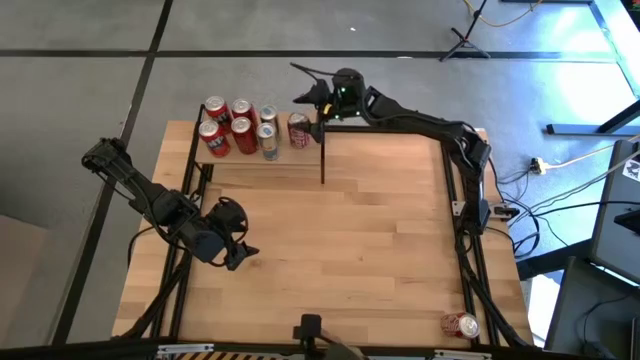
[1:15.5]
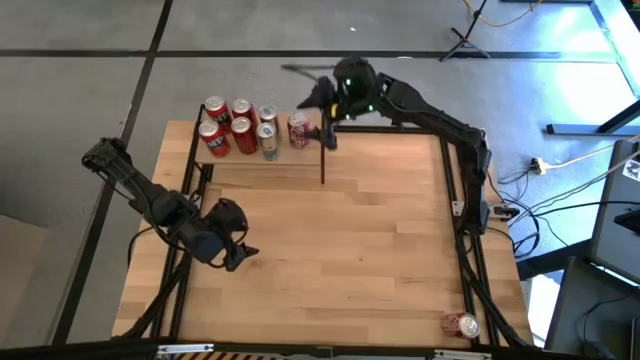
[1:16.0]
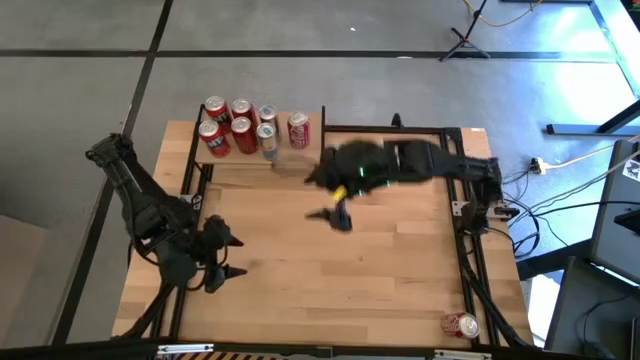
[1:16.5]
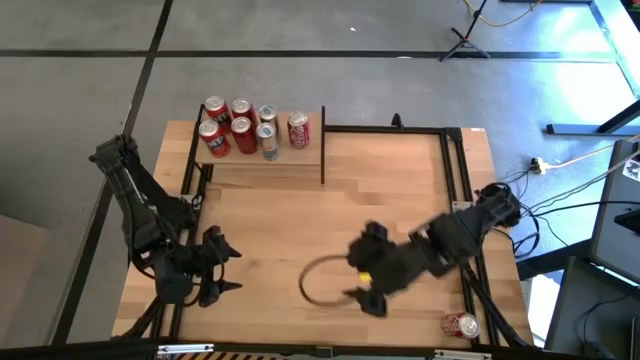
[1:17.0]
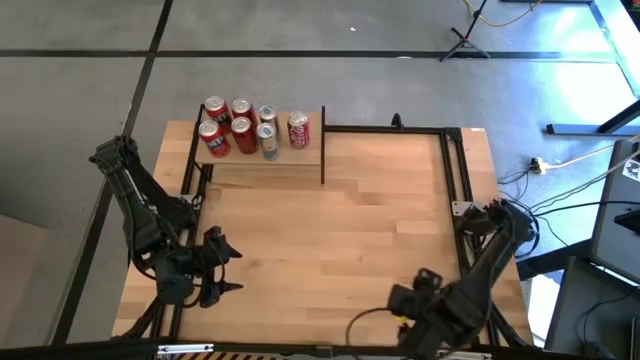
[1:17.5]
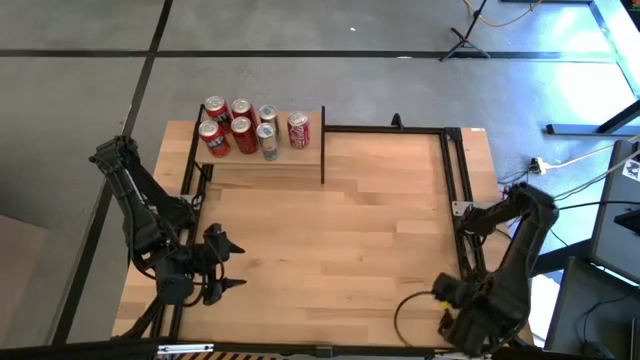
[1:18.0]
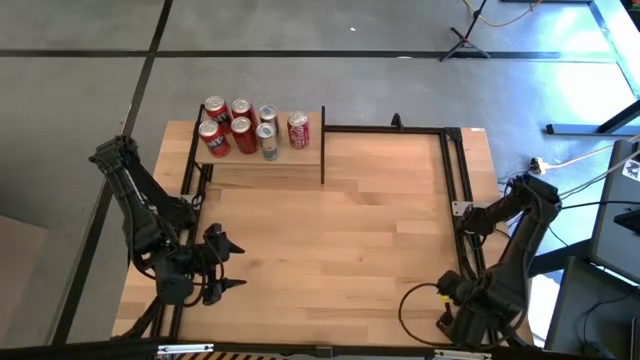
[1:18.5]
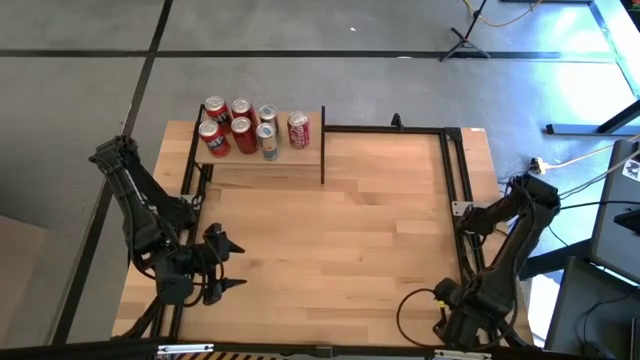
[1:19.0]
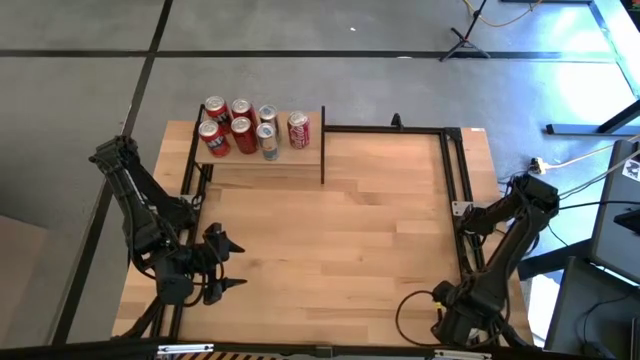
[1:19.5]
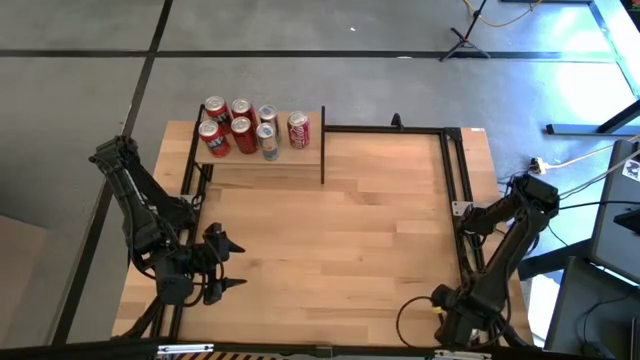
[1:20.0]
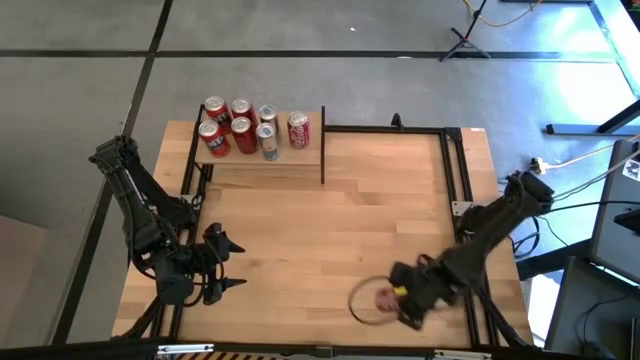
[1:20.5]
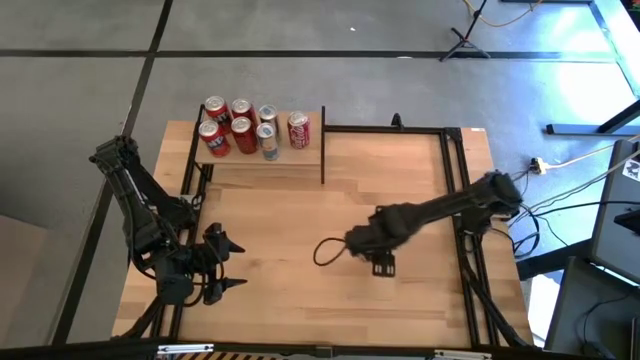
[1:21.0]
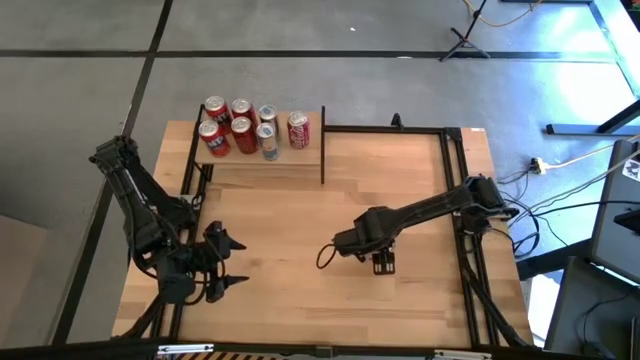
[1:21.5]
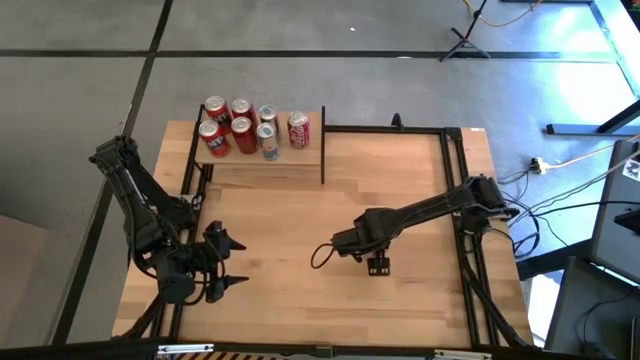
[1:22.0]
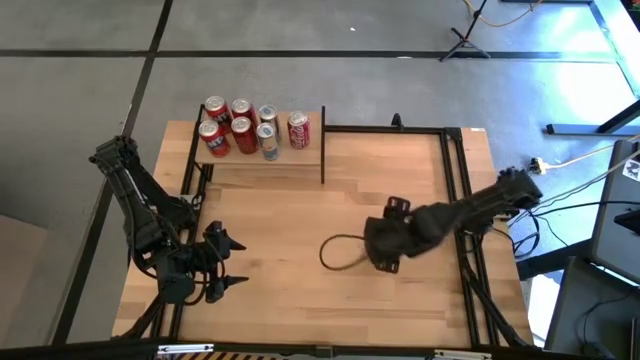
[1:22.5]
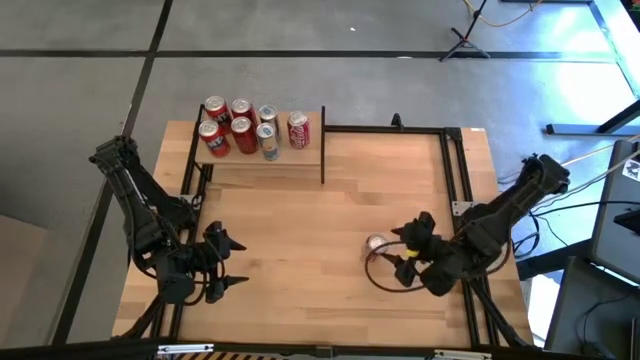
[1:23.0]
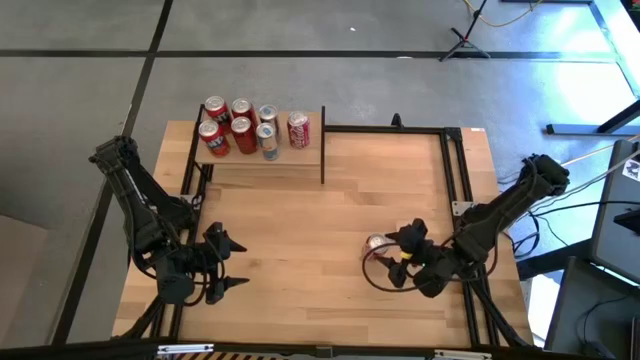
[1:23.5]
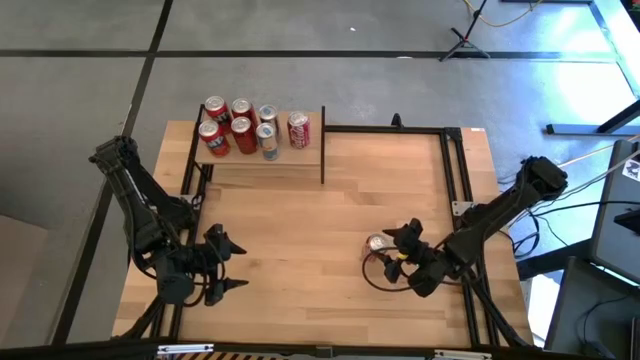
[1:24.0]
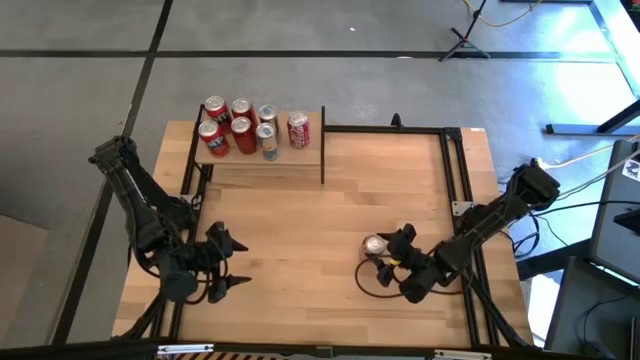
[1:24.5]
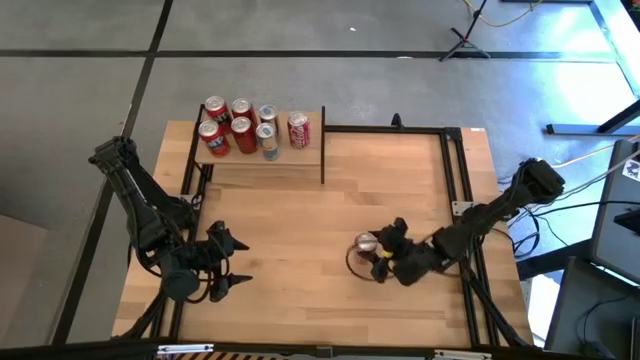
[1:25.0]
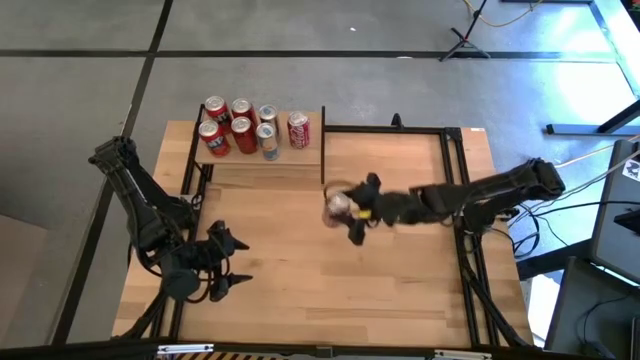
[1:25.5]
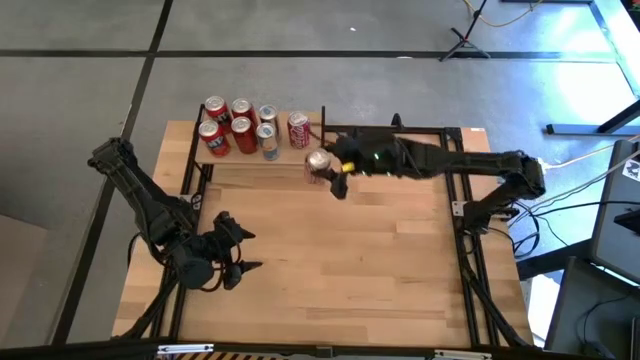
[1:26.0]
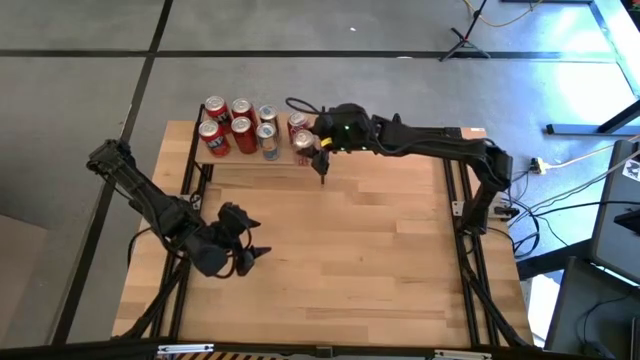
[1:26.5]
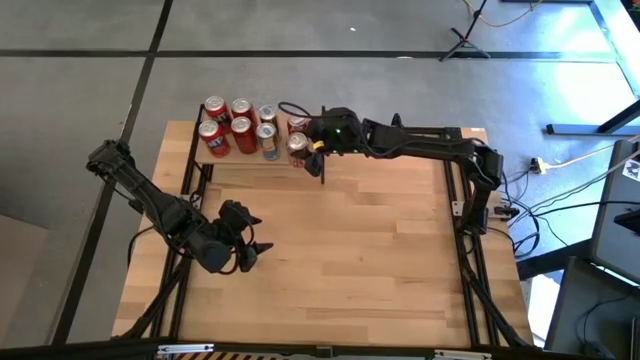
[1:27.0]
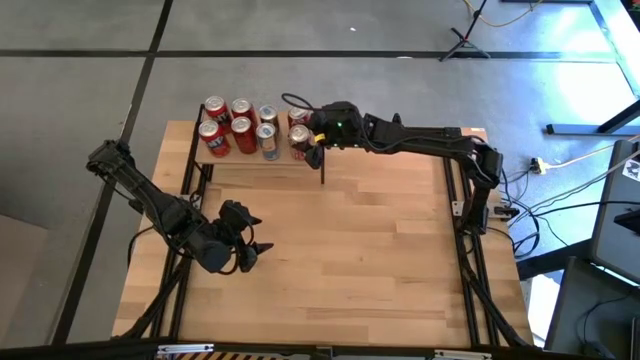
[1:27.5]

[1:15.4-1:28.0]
Task: Place canned beverage on shelf
Put the red white soda can on the shelf aligned with the other red white soda can

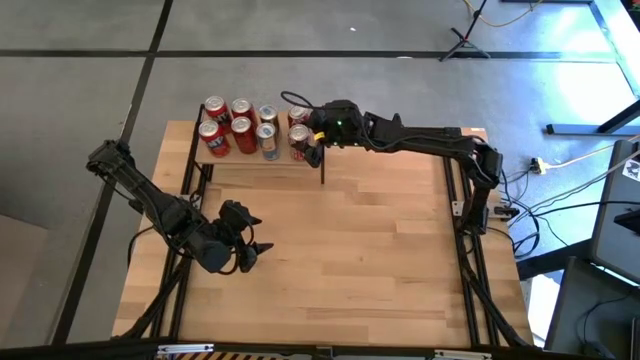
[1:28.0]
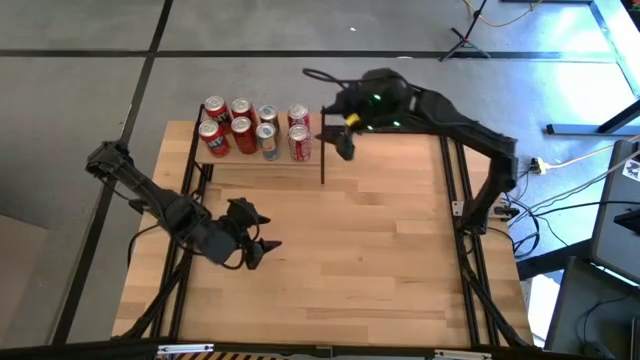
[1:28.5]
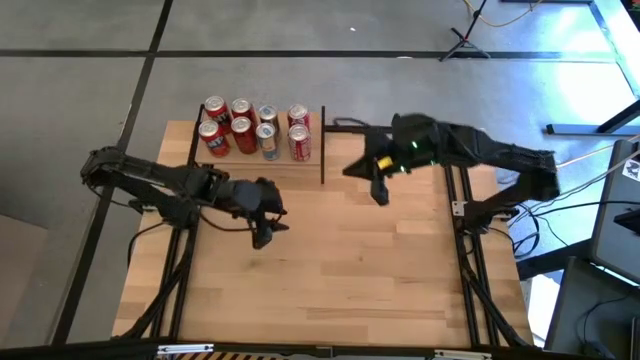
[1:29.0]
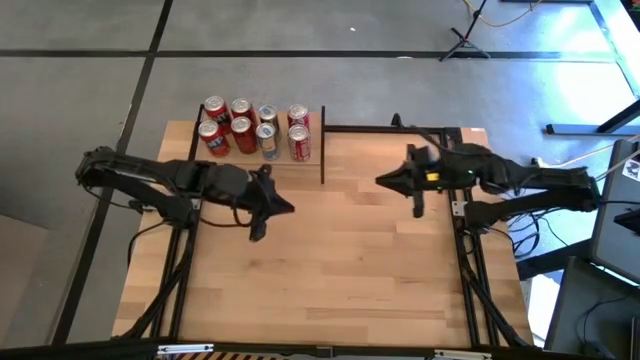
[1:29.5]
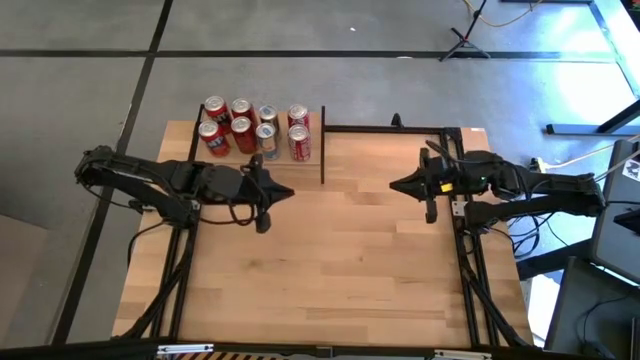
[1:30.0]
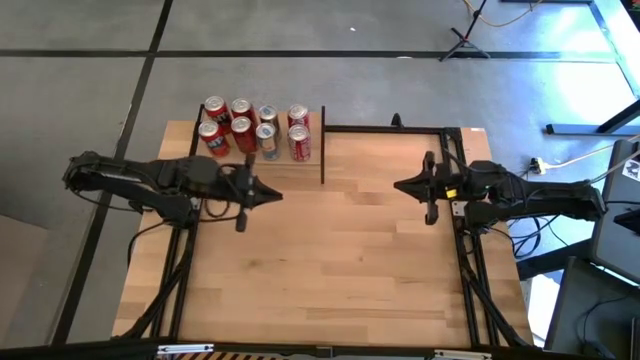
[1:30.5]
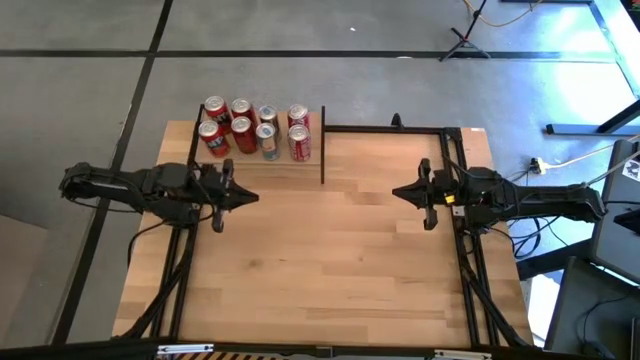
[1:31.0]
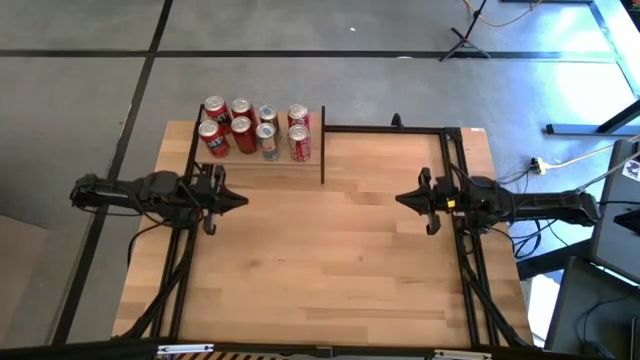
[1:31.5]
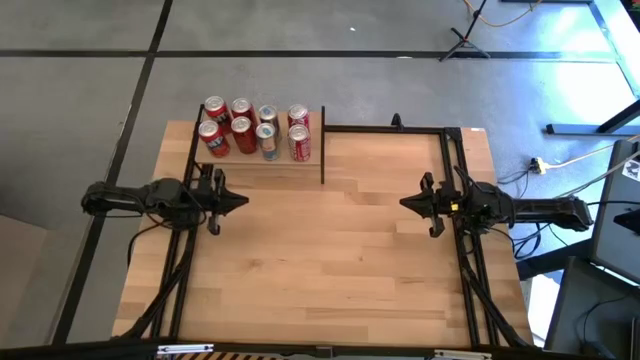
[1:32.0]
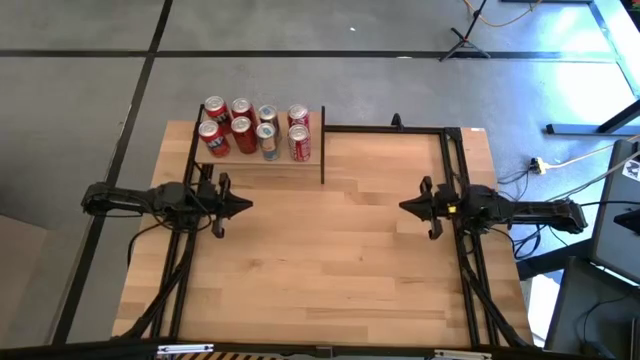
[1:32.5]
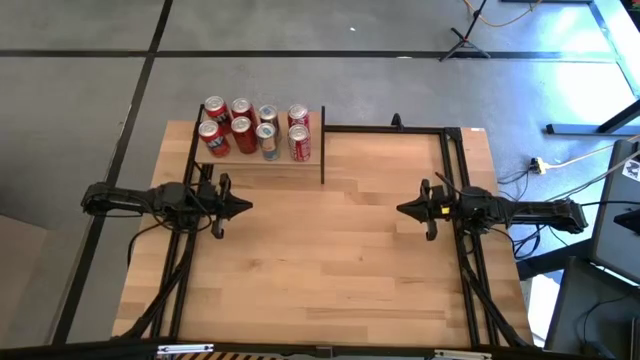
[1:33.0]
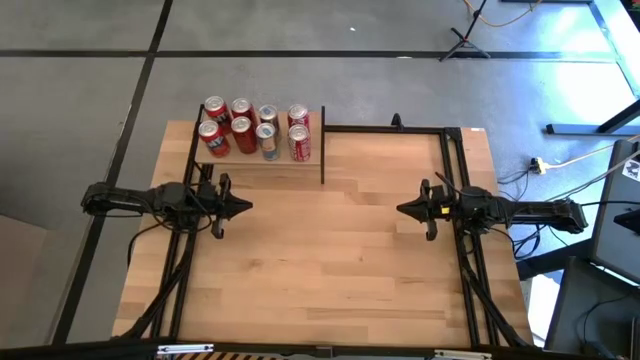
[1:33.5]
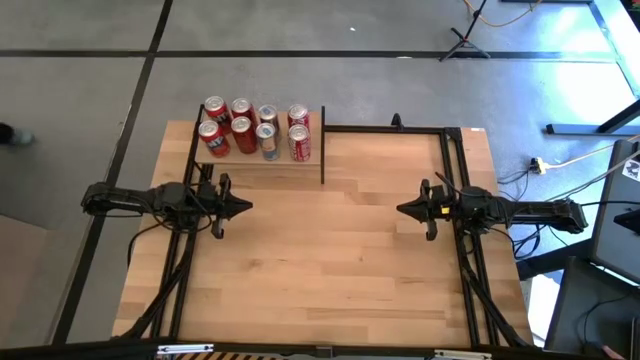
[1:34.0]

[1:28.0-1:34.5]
Return to Home Position

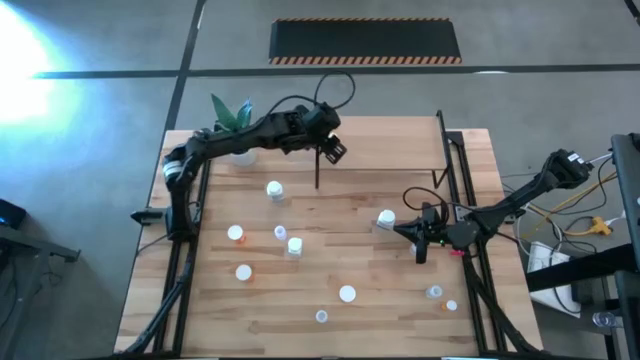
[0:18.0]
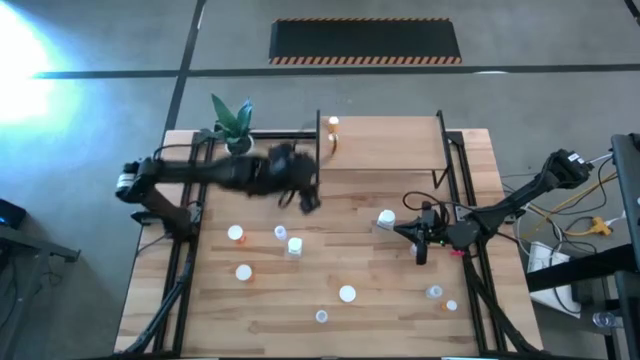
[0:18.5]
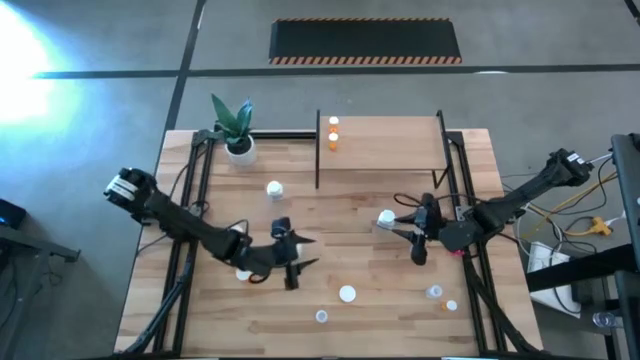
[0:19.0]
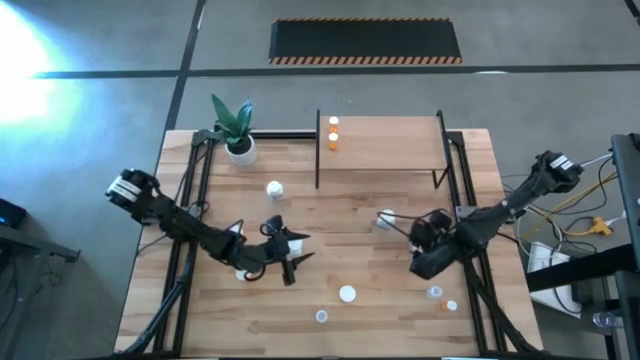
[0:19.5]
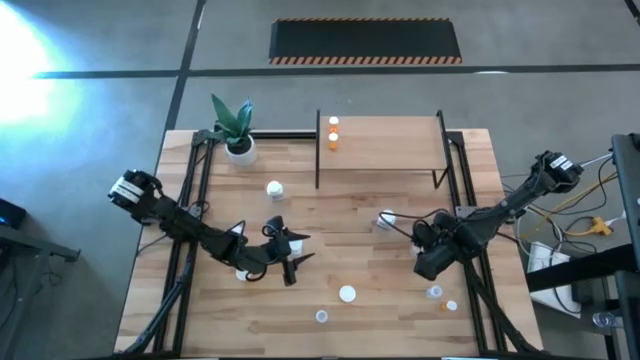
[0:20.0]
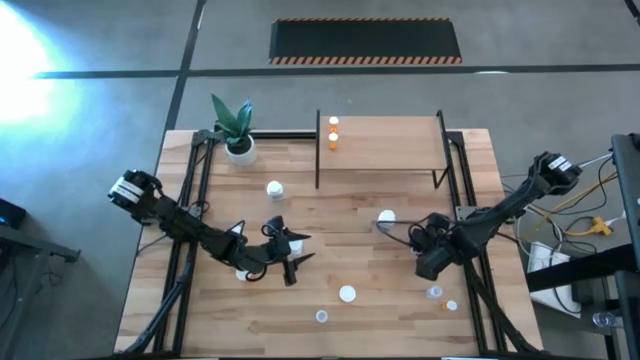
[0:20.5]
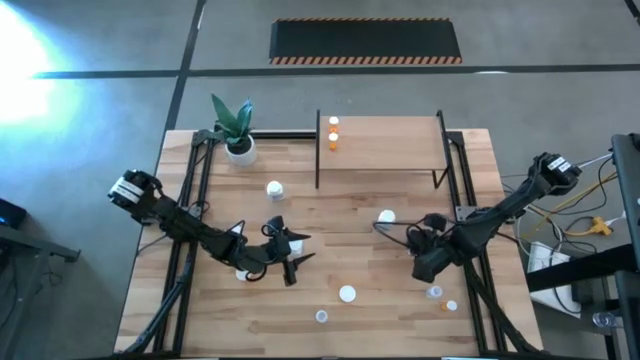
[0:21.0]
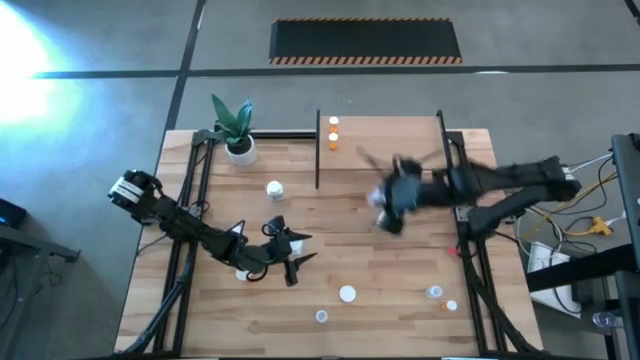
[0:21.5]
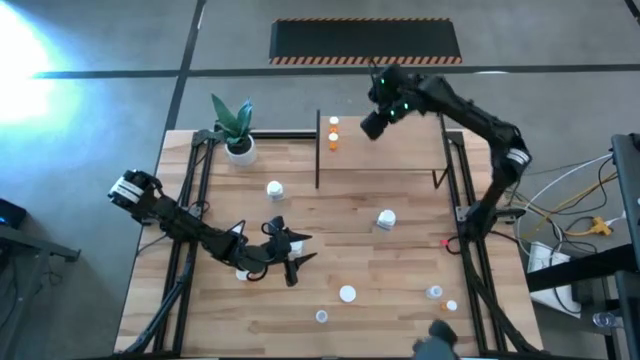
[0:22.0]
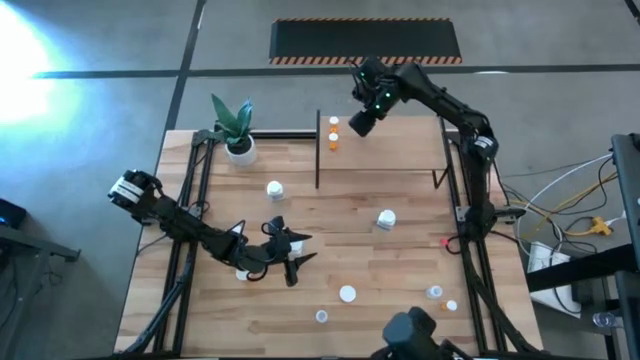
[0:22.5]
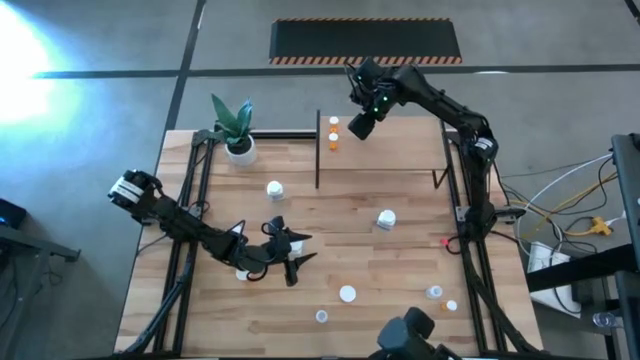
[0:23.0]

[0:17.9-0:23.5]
Task: Pick and place medicine bottles onto shelf by color
Put the transparent pill bottle on the shelf
